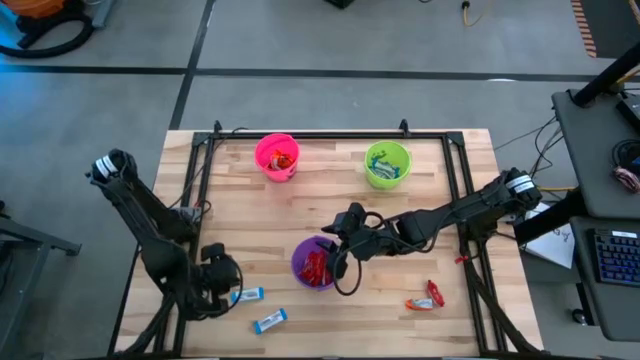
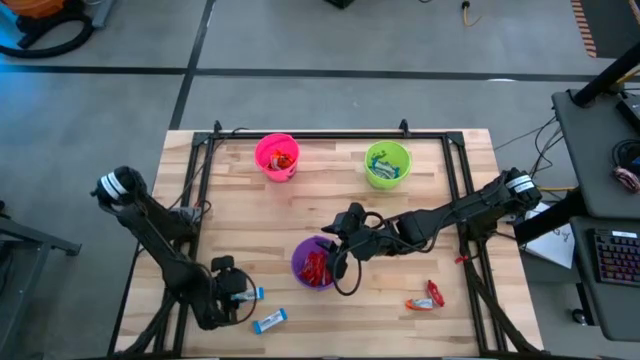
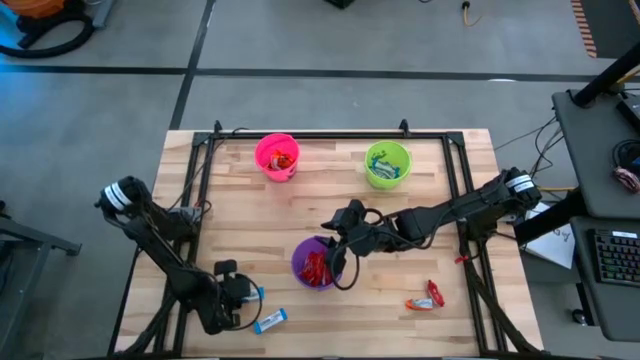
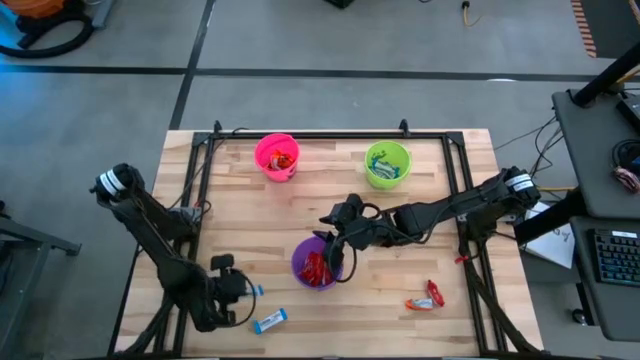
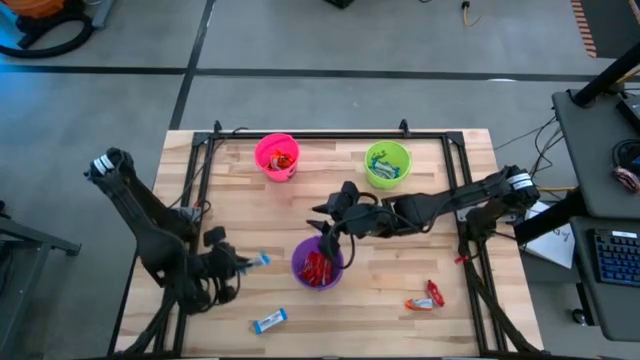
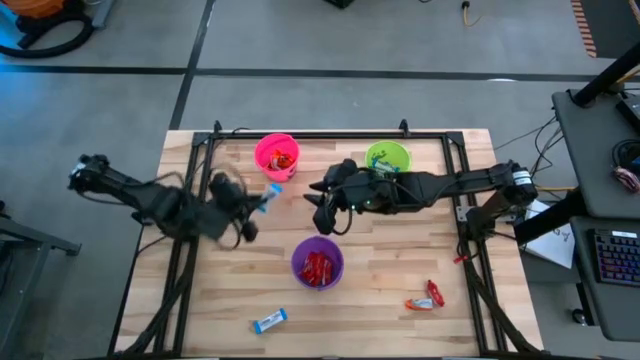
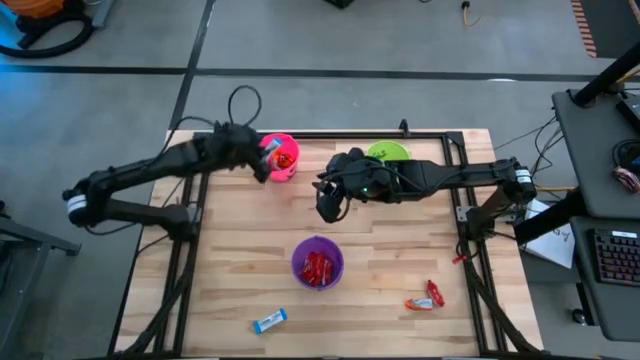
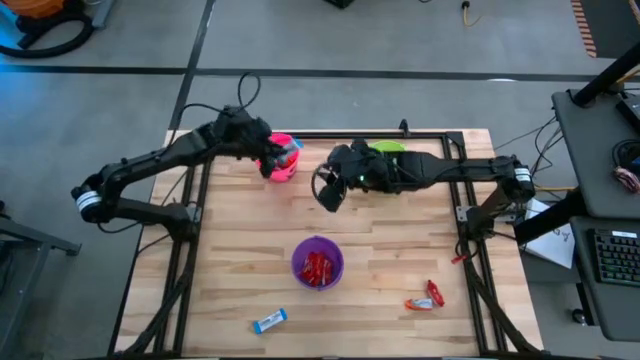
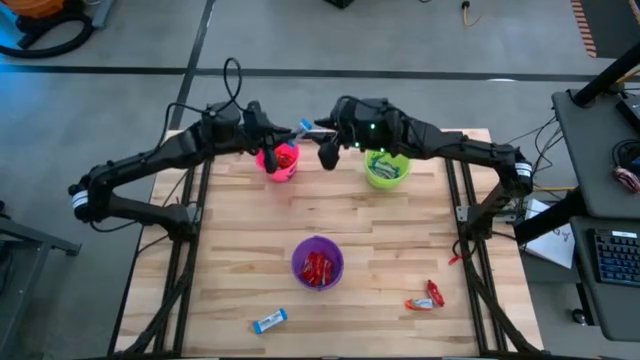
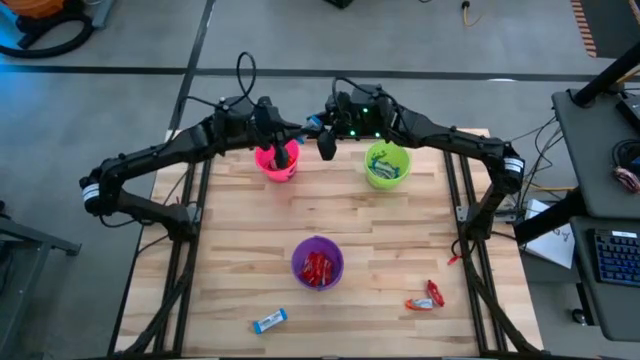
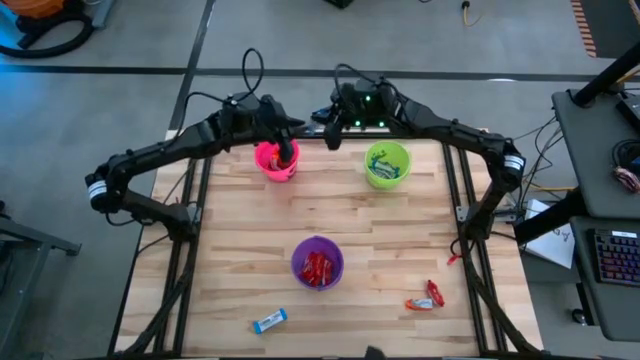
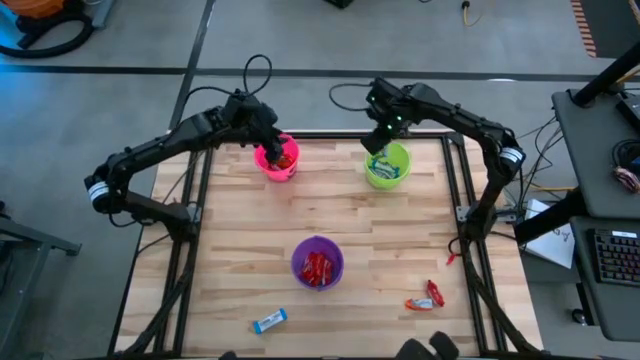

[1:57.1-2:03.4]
Task: Sort candy
Put the white-blue chocolate into the green bucket

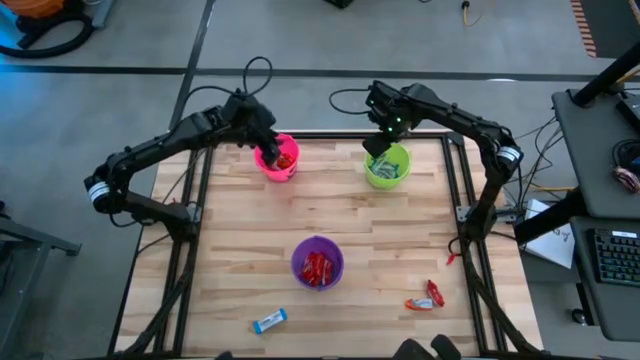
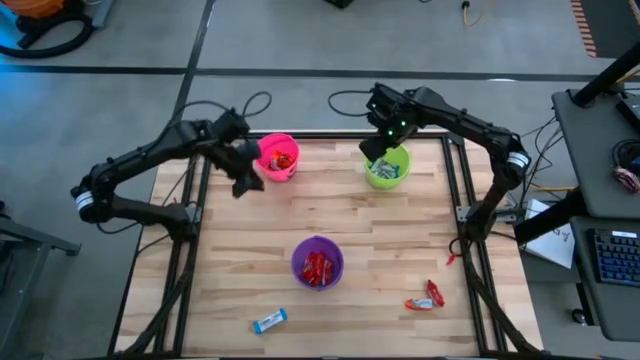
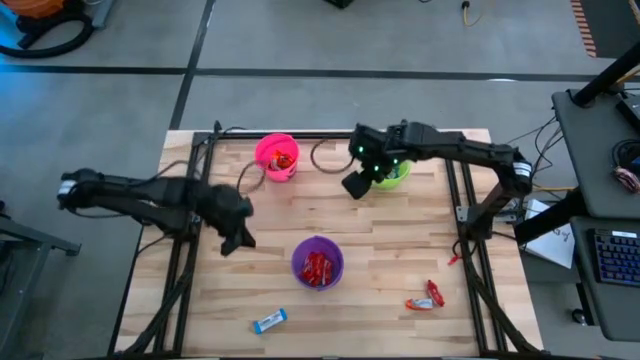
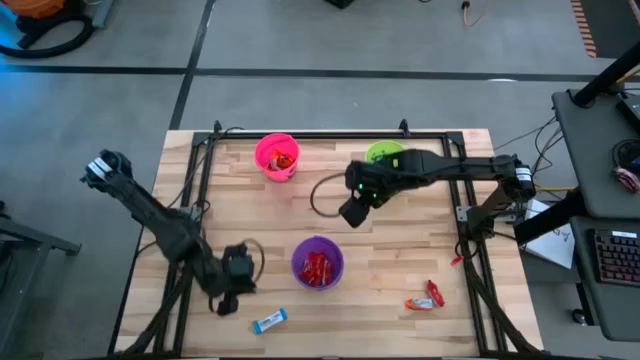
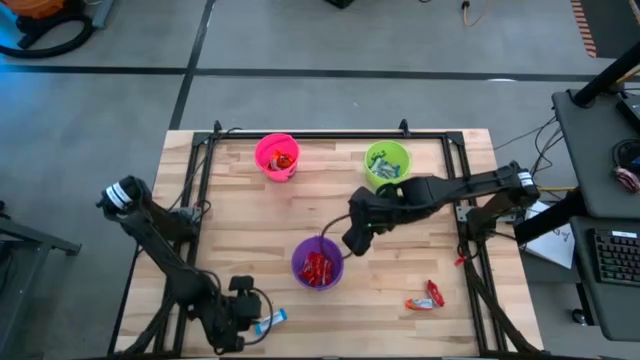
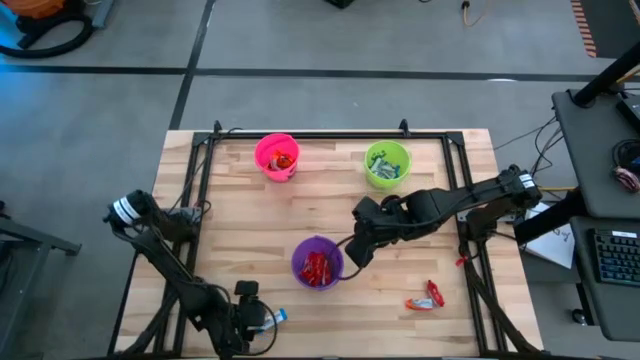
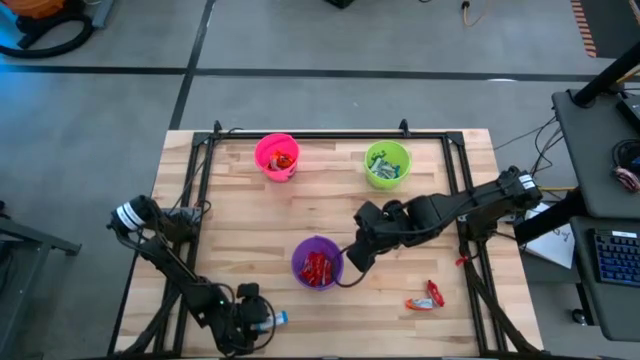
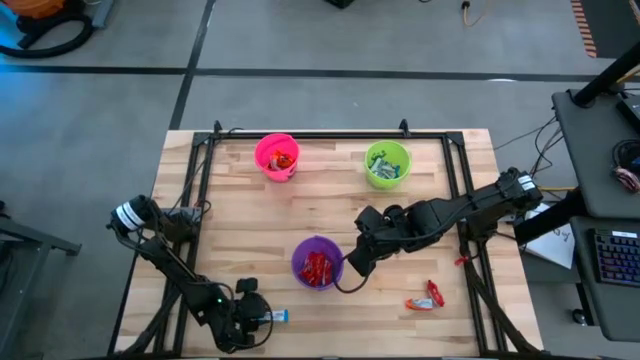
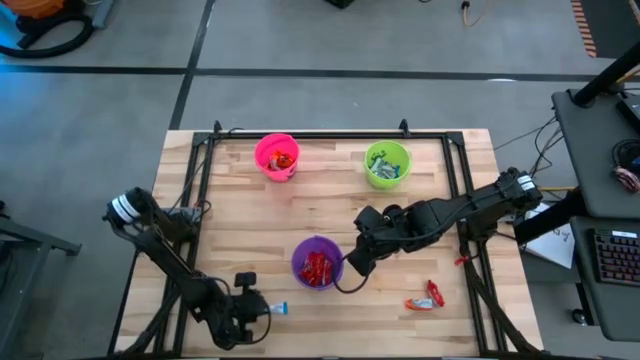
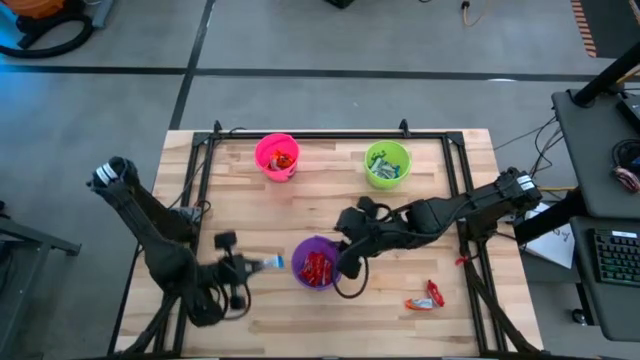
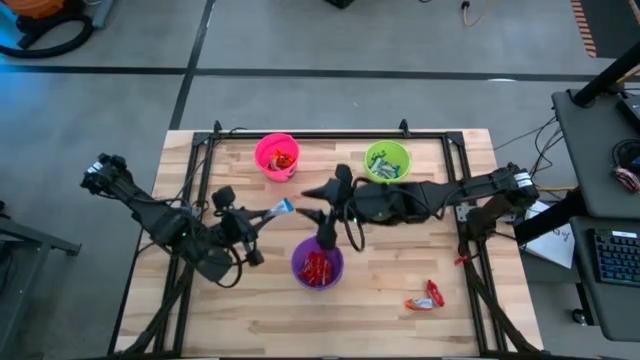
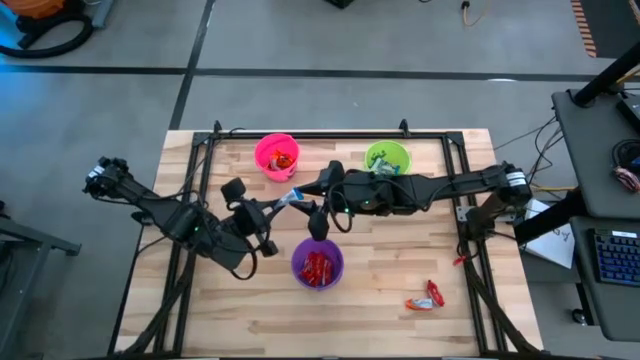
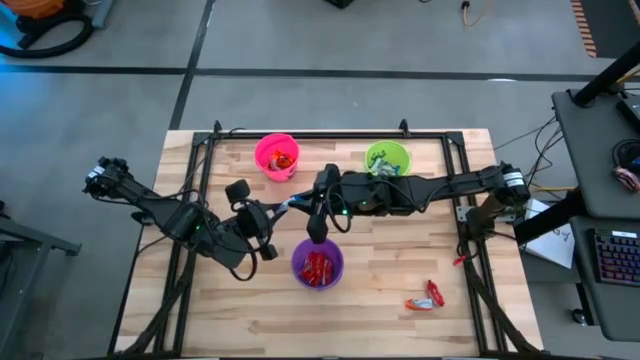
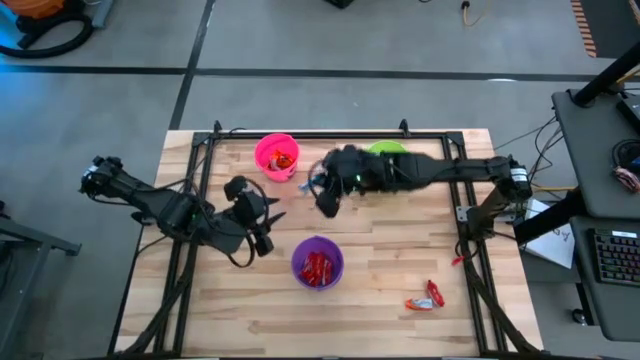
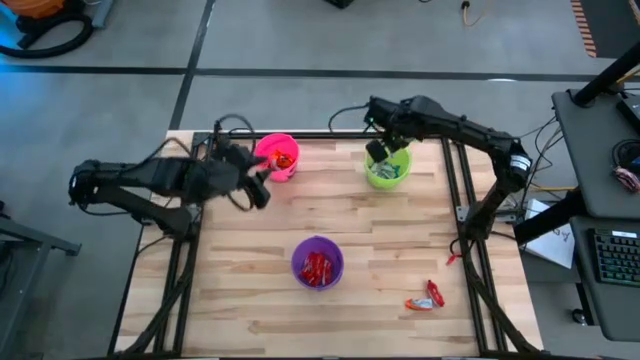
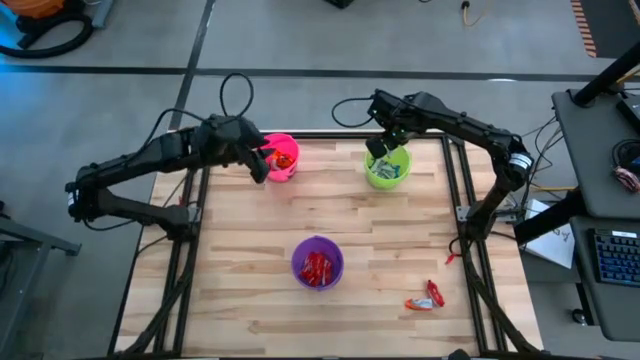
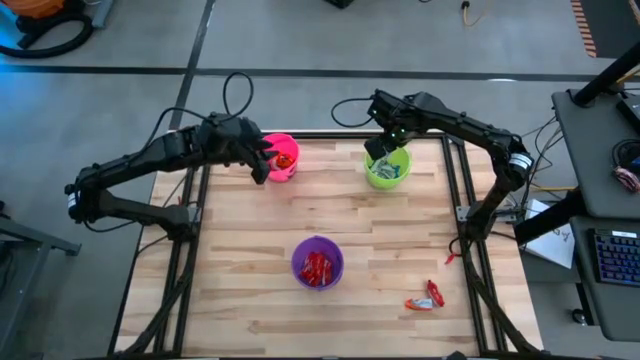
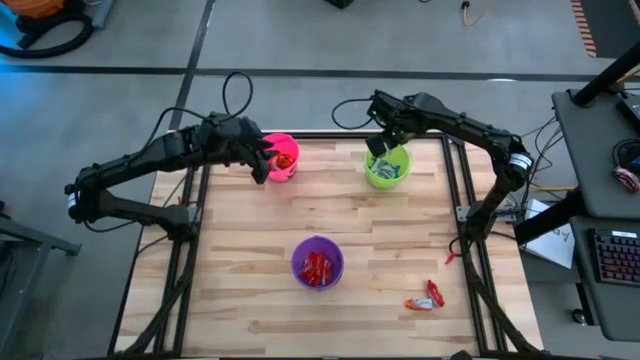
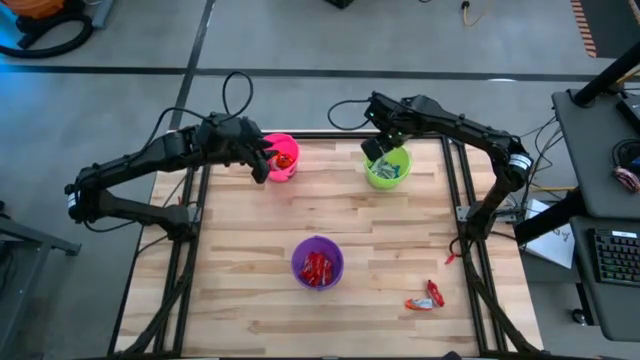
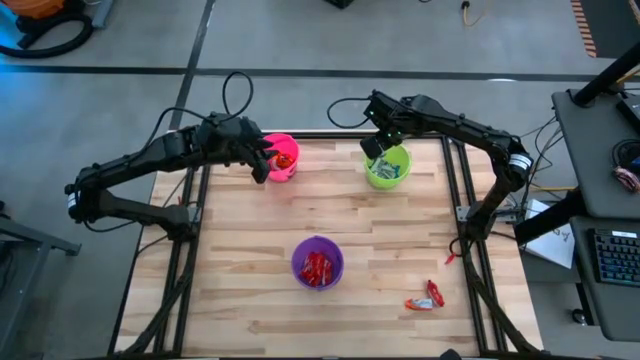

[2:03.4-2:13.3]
Put the white-blue chocolate into the green bucket

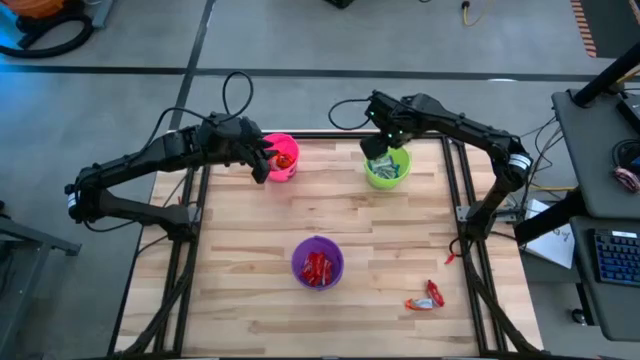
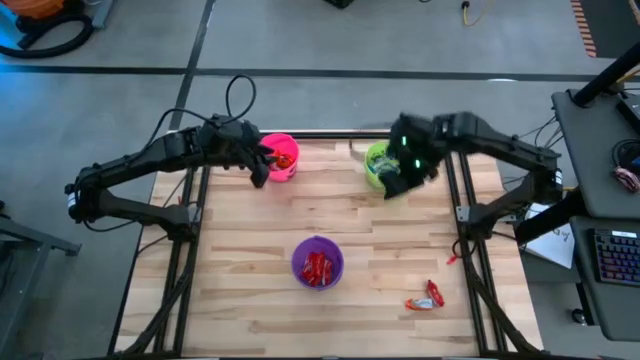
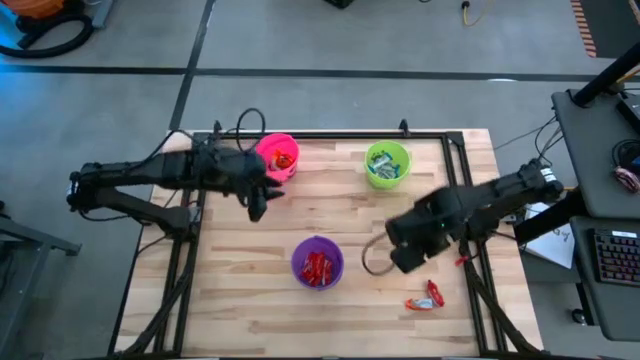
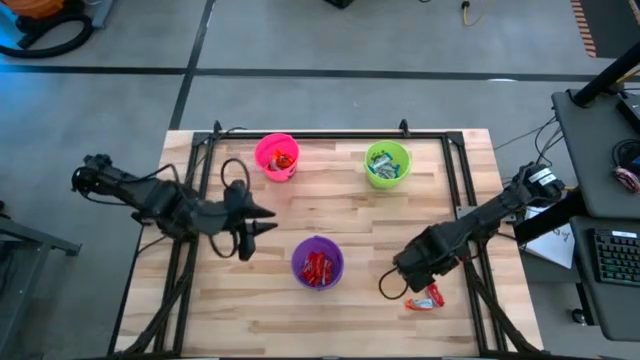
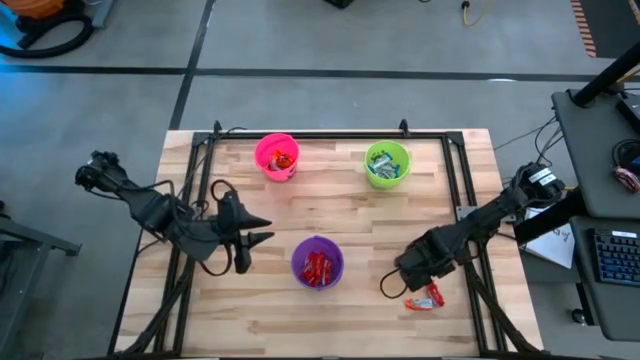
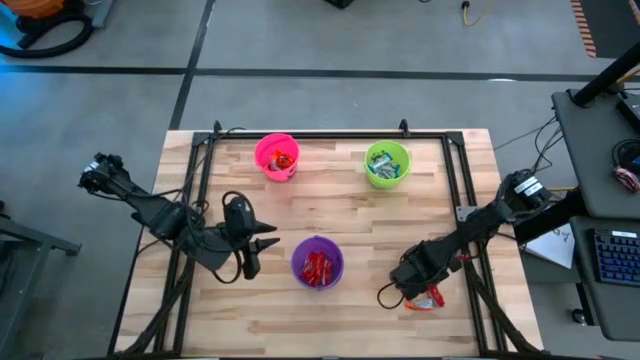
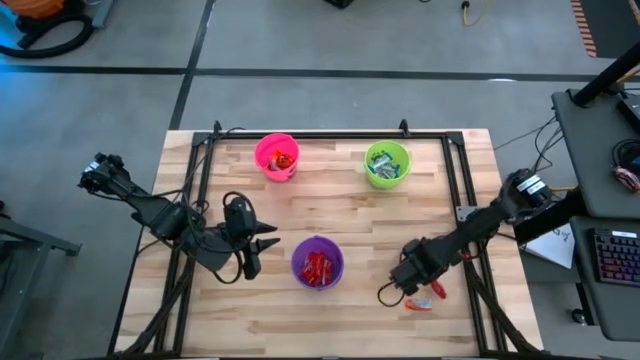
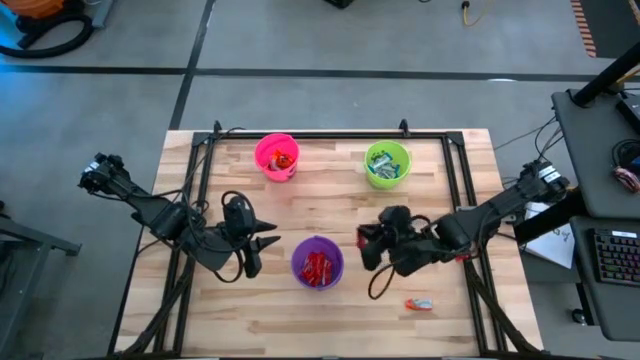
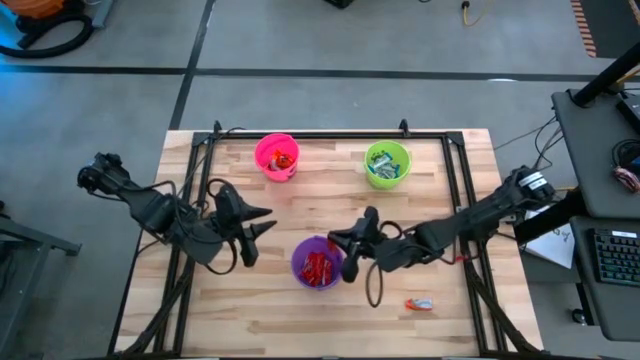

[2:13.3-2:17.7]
Put the red chocolate into the violet bucket

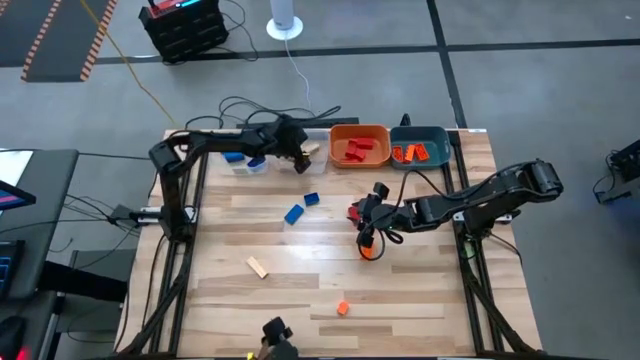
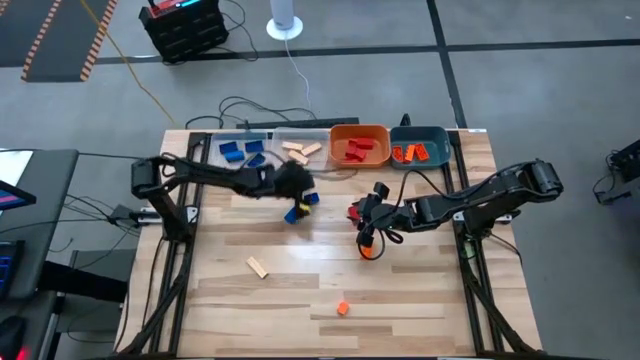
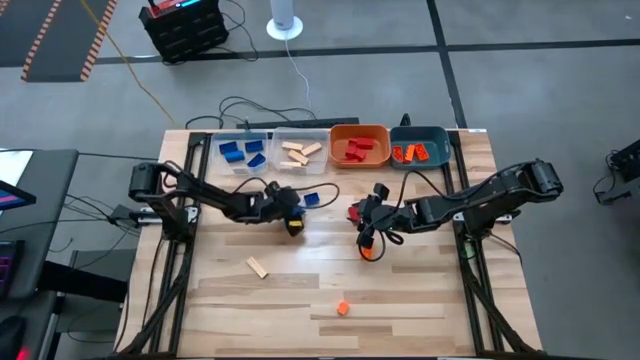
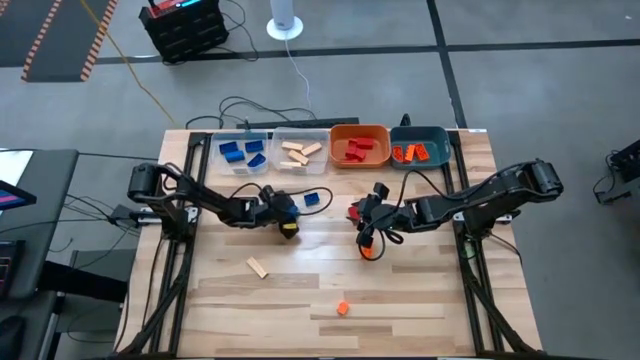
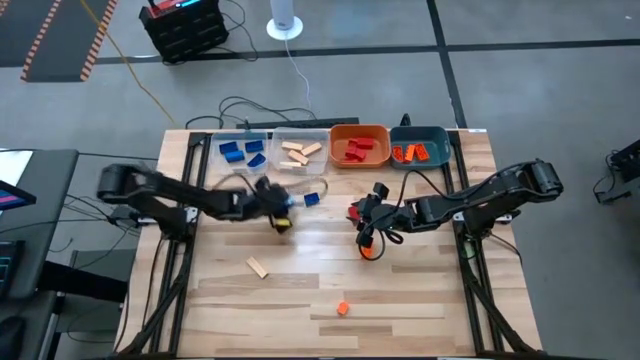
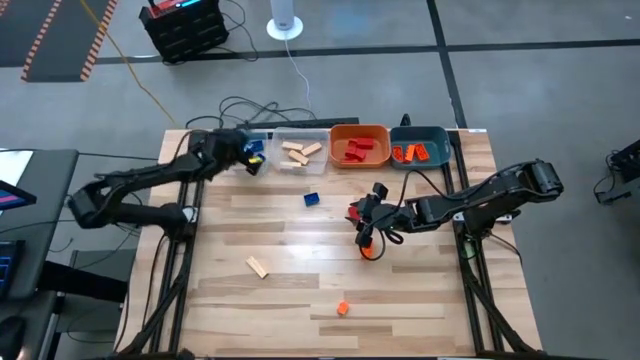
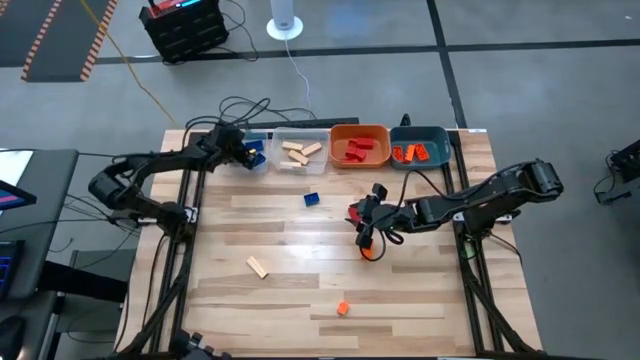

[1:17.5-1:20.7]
Task: Sort blocks
Put the blue game piece into the left transparent bin
